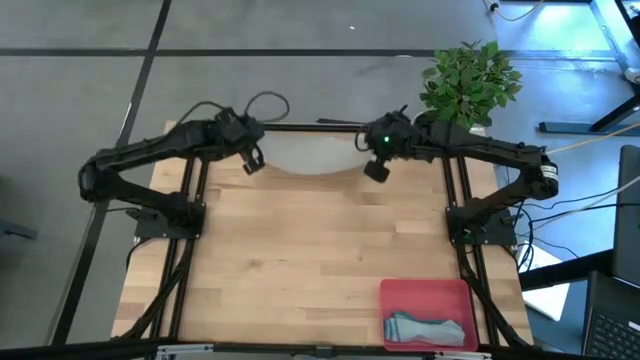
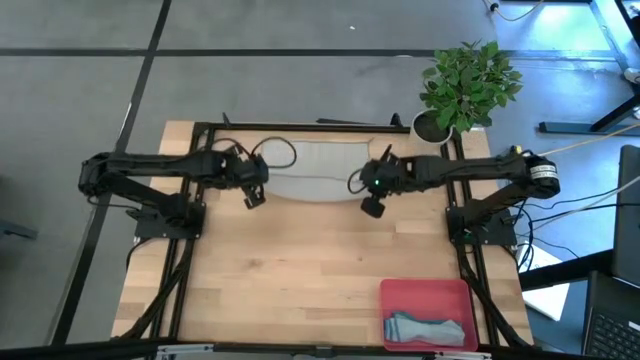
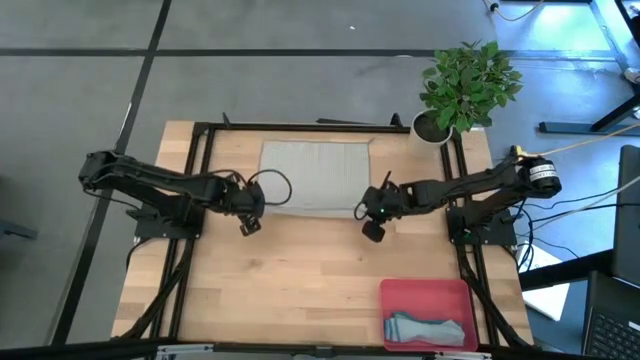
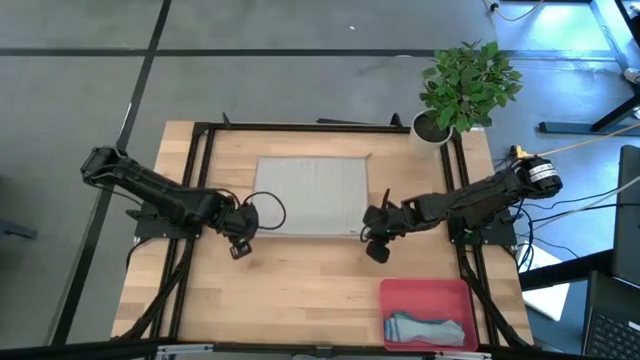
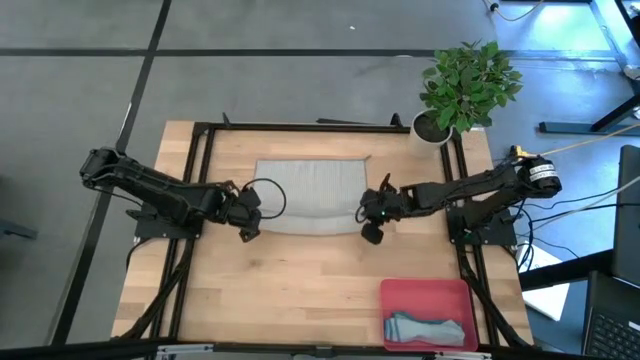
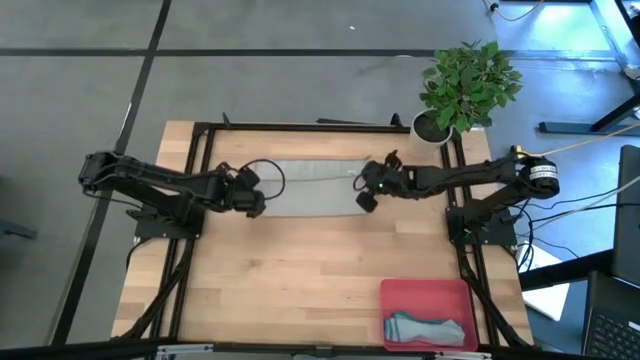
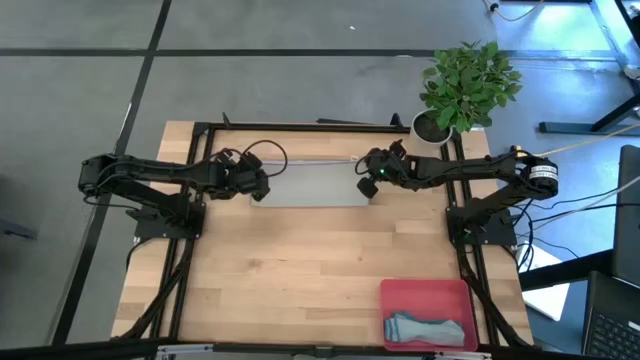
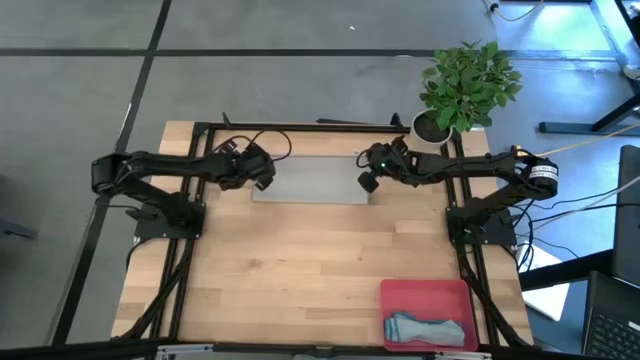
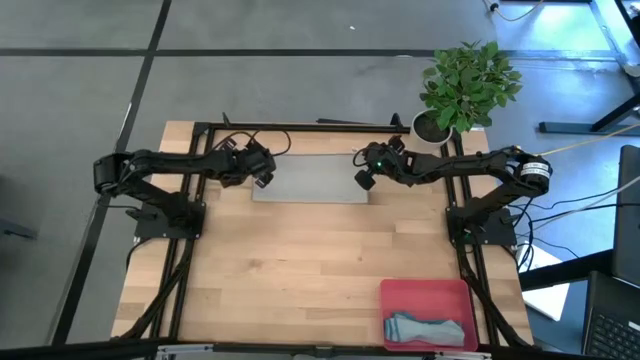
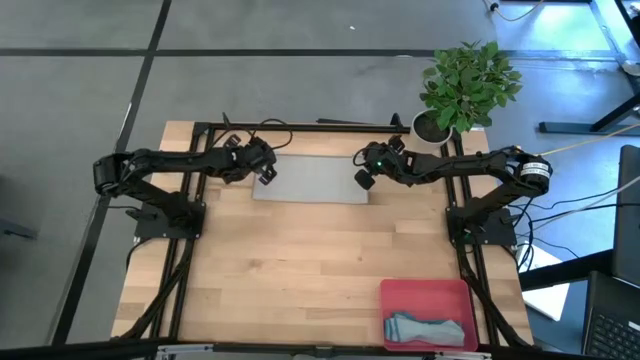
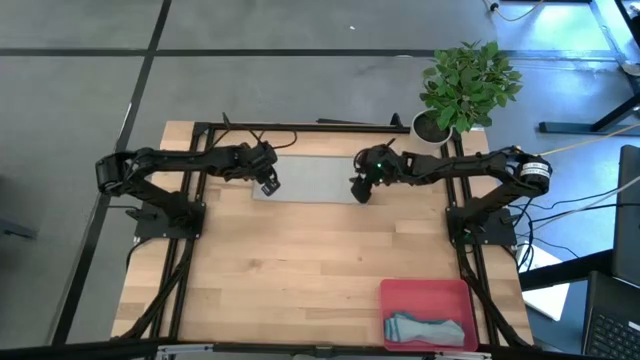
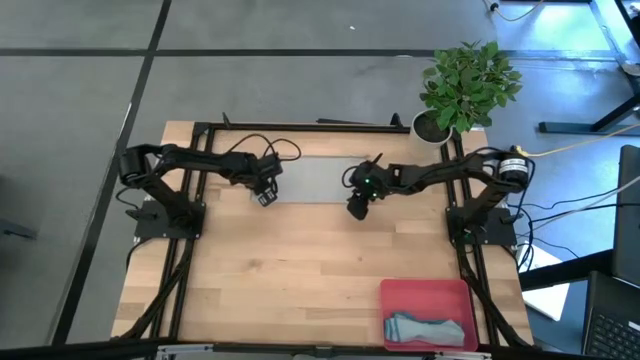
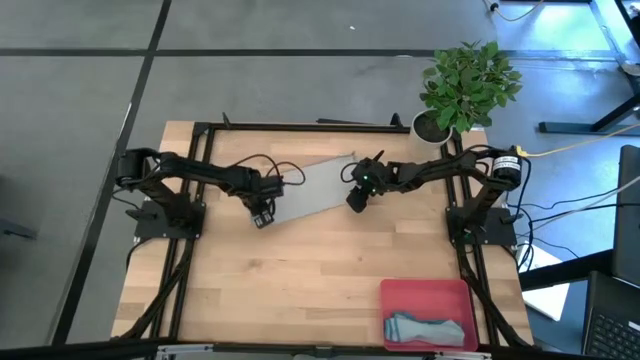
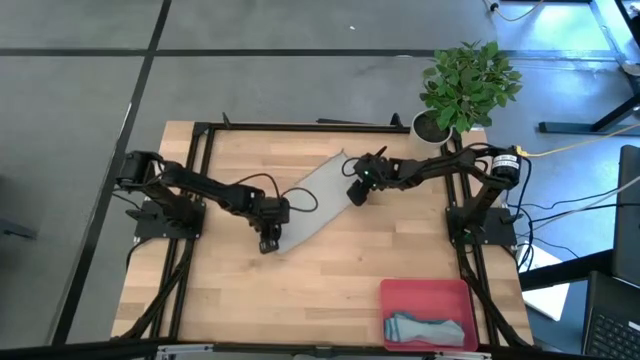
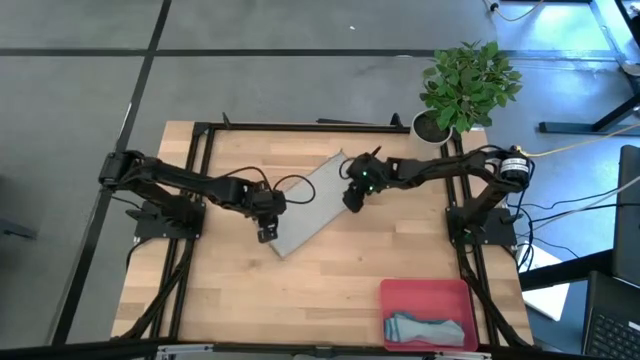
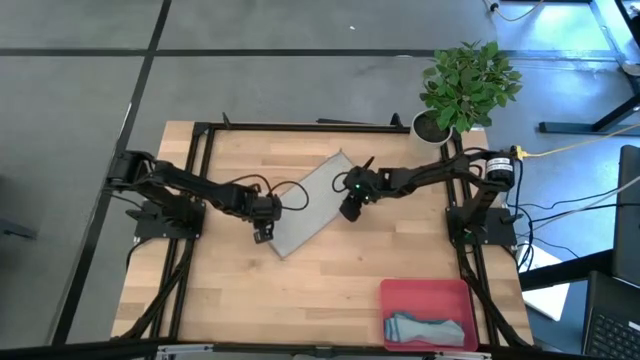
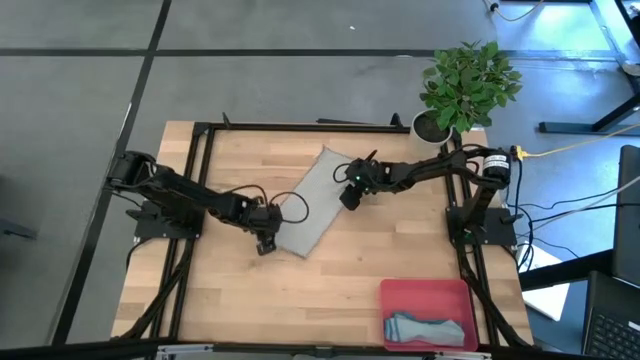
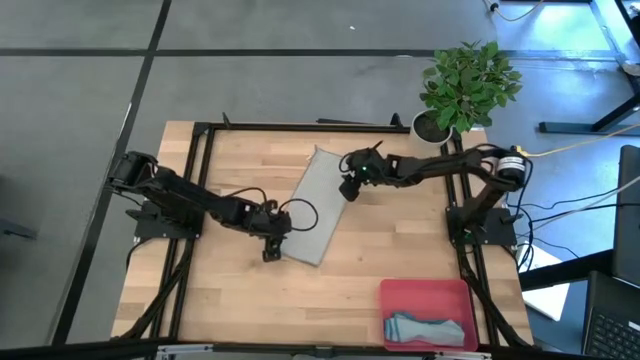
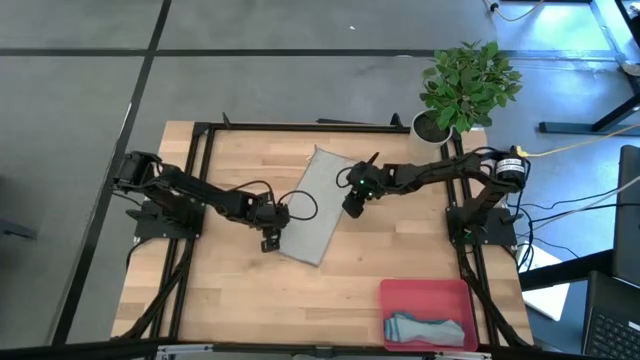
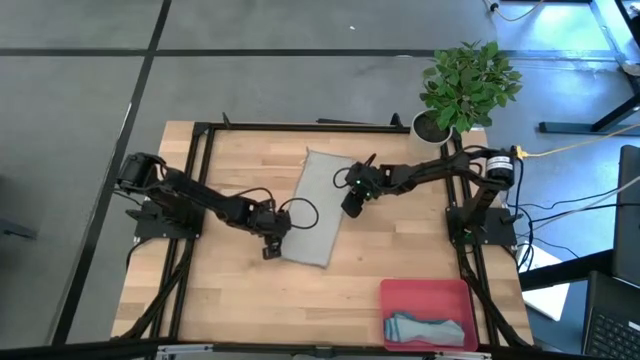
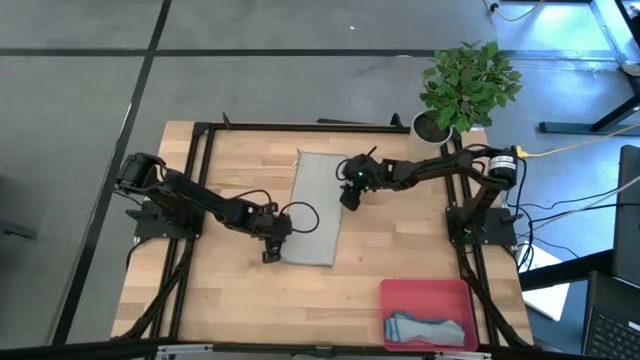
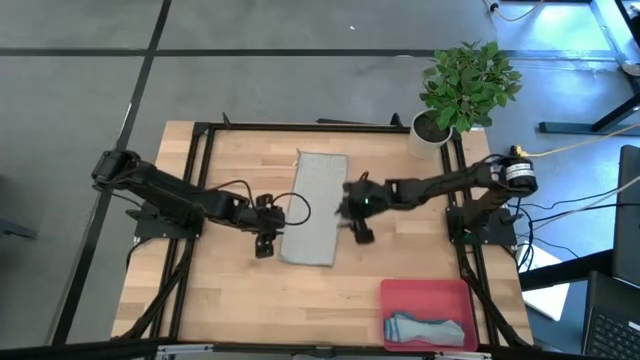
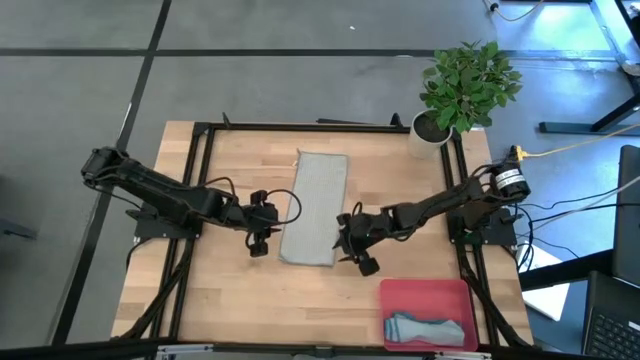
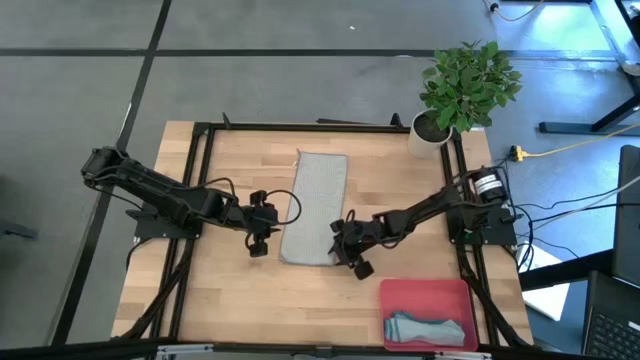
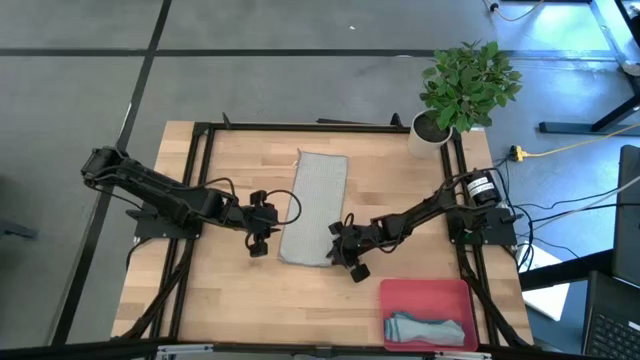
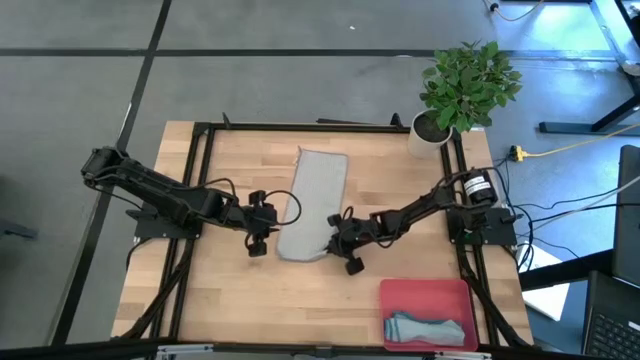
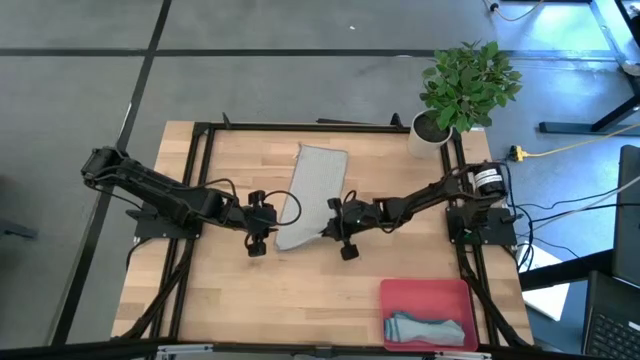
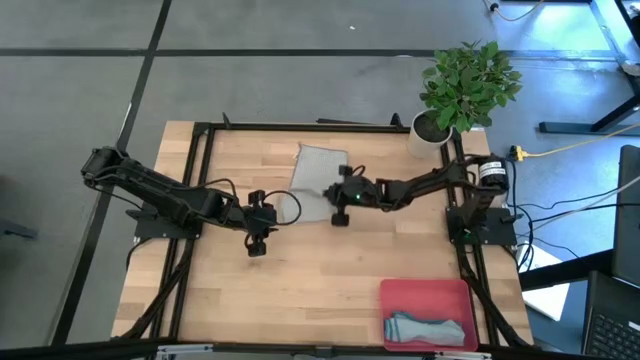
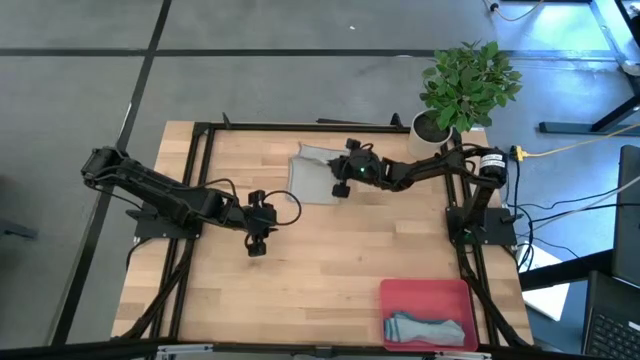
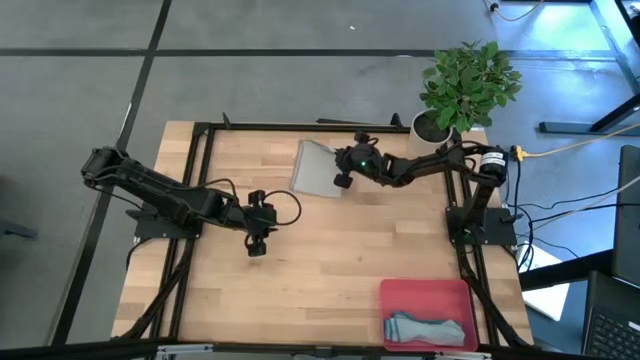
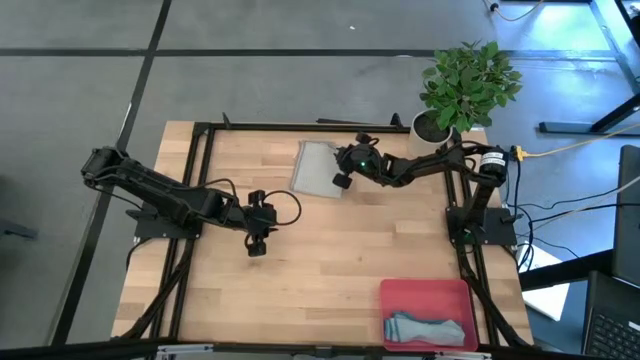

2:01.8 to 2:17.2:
Task: Roll microfiber towels into tight, uniform cylinder then place into a basket
Fold the gray towel
